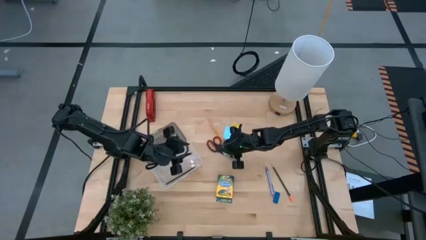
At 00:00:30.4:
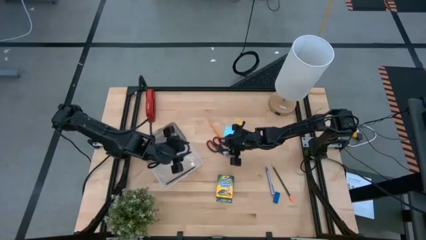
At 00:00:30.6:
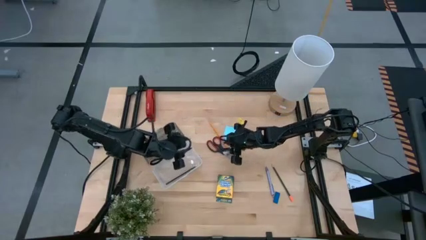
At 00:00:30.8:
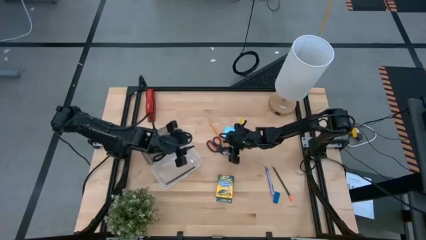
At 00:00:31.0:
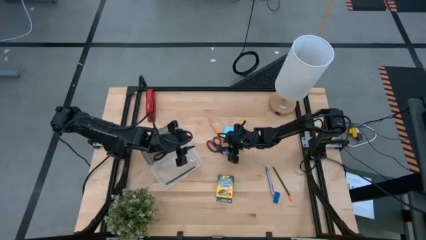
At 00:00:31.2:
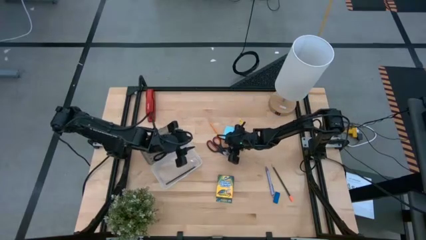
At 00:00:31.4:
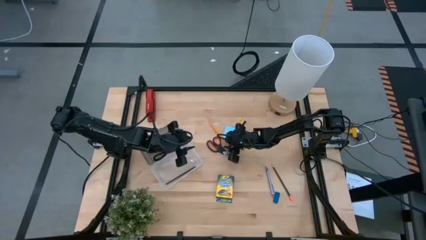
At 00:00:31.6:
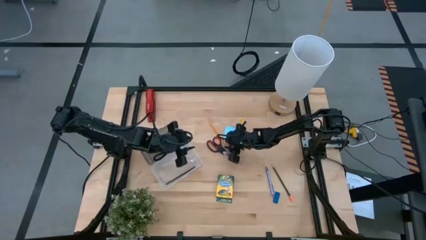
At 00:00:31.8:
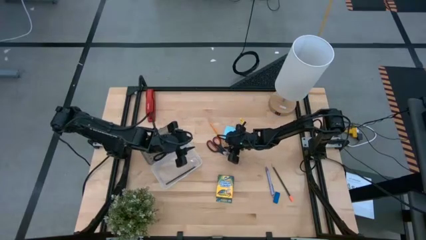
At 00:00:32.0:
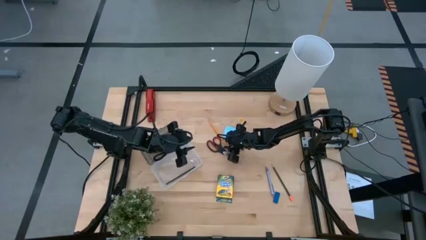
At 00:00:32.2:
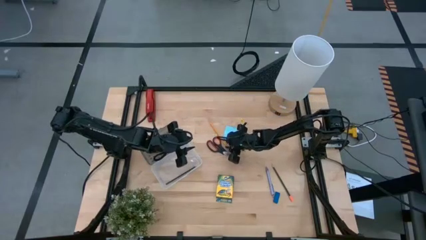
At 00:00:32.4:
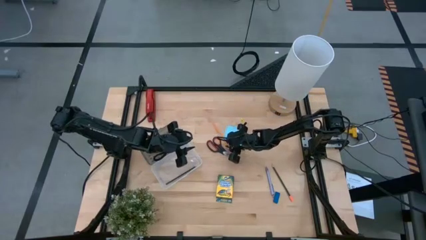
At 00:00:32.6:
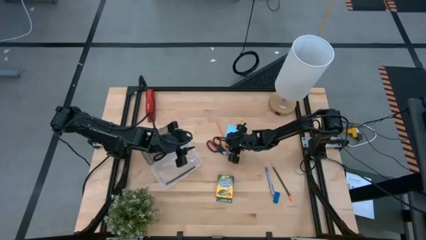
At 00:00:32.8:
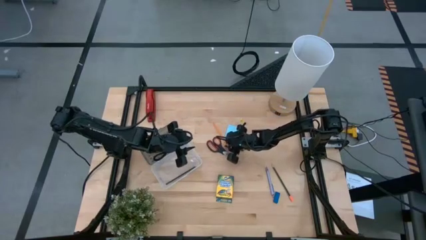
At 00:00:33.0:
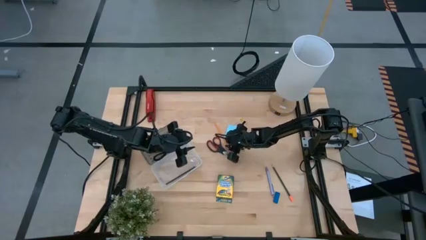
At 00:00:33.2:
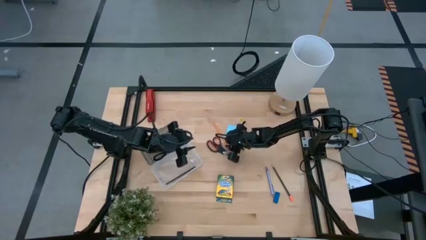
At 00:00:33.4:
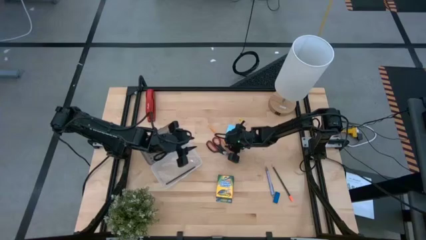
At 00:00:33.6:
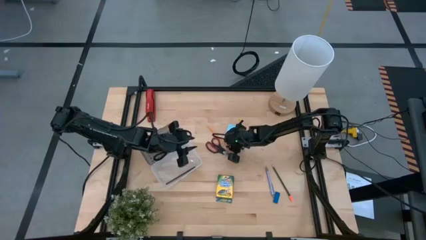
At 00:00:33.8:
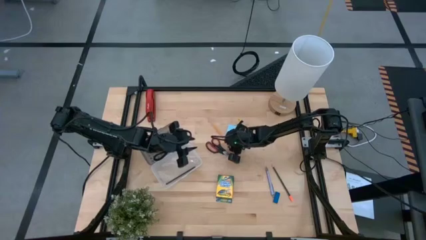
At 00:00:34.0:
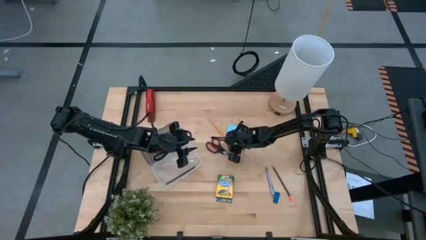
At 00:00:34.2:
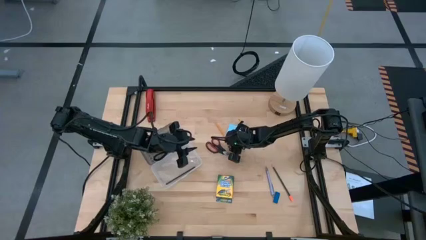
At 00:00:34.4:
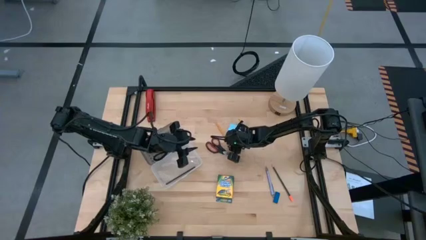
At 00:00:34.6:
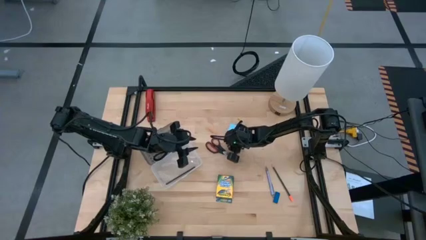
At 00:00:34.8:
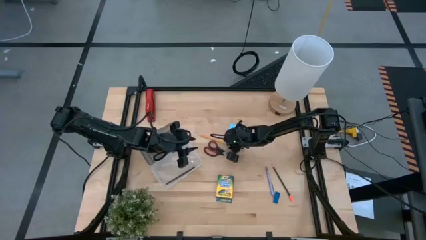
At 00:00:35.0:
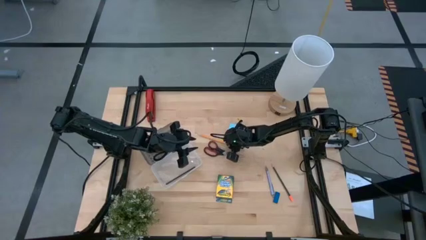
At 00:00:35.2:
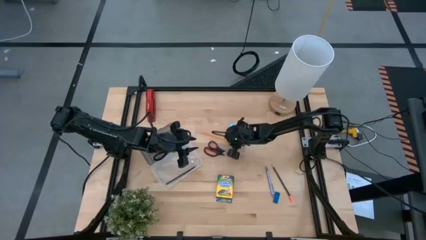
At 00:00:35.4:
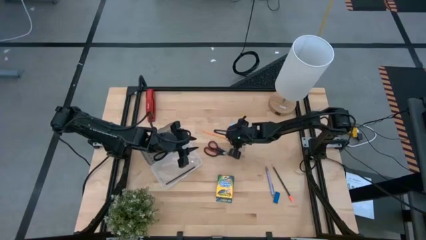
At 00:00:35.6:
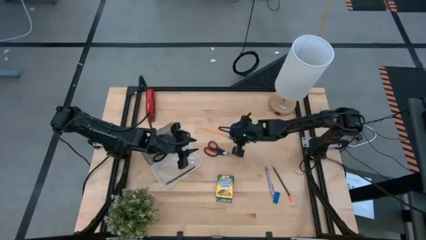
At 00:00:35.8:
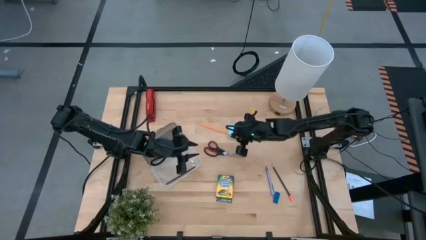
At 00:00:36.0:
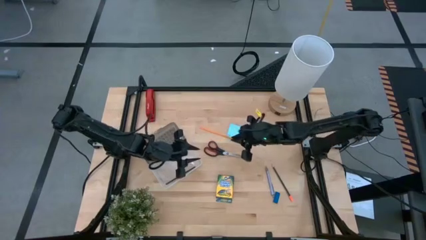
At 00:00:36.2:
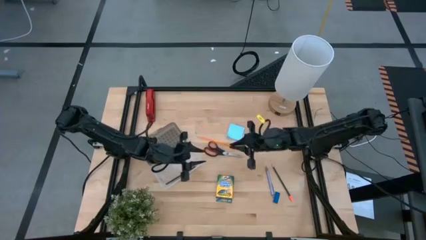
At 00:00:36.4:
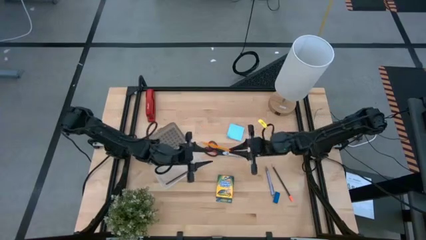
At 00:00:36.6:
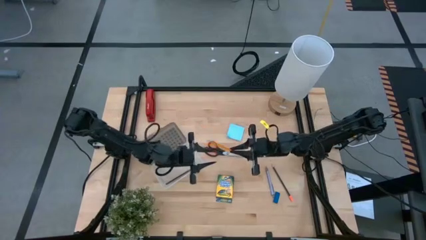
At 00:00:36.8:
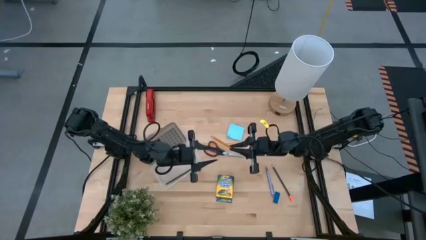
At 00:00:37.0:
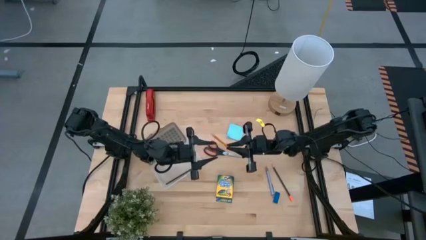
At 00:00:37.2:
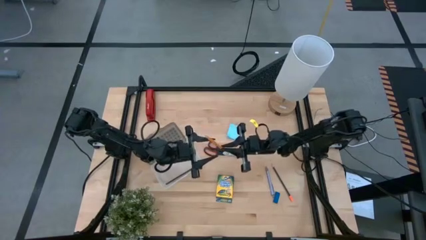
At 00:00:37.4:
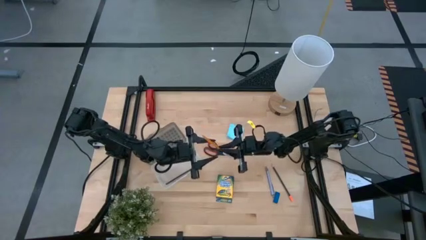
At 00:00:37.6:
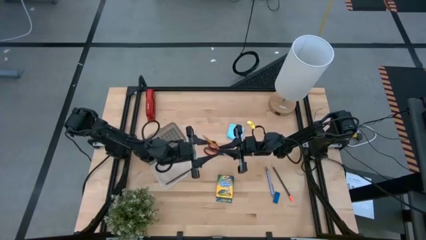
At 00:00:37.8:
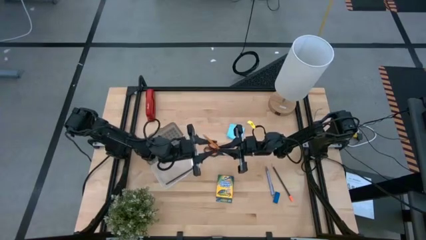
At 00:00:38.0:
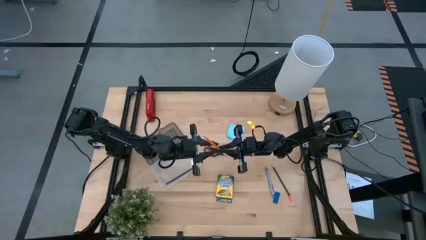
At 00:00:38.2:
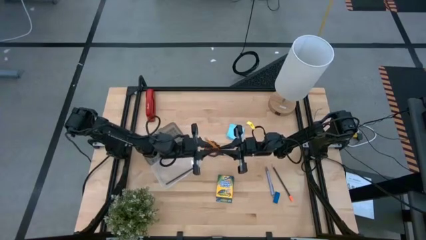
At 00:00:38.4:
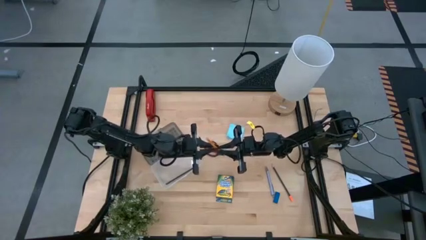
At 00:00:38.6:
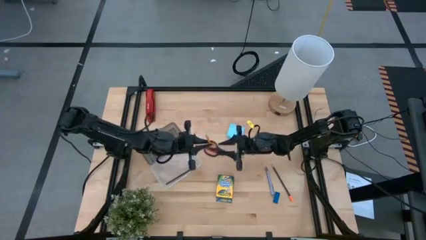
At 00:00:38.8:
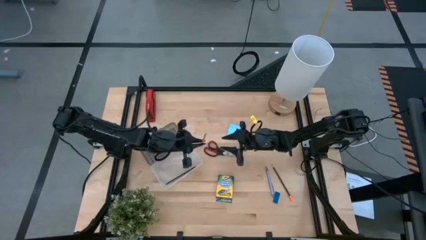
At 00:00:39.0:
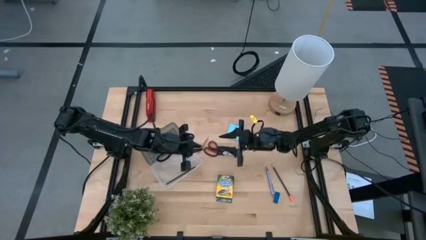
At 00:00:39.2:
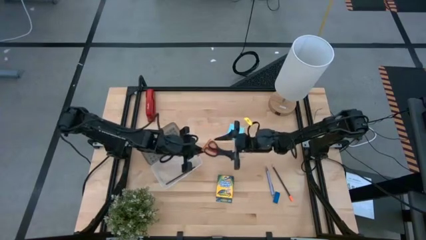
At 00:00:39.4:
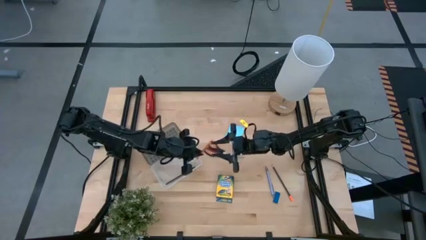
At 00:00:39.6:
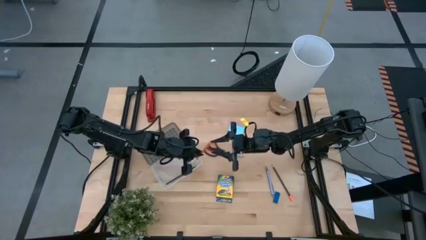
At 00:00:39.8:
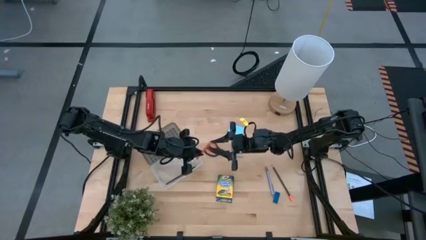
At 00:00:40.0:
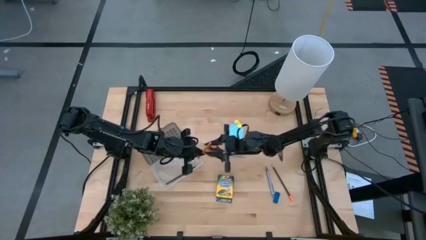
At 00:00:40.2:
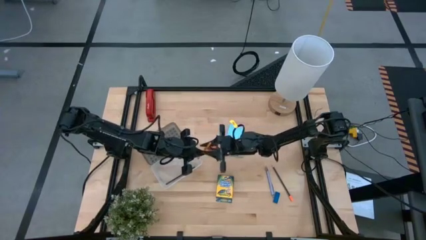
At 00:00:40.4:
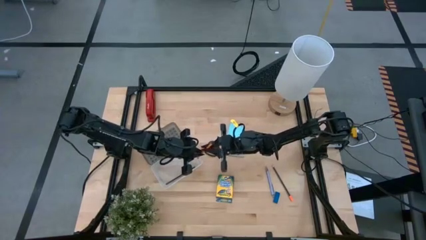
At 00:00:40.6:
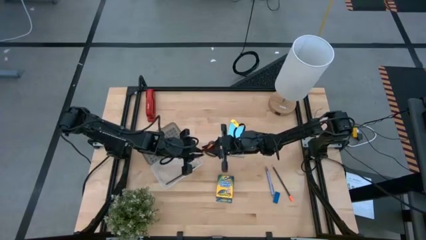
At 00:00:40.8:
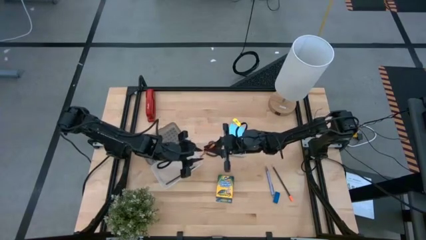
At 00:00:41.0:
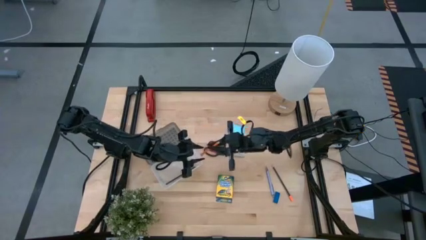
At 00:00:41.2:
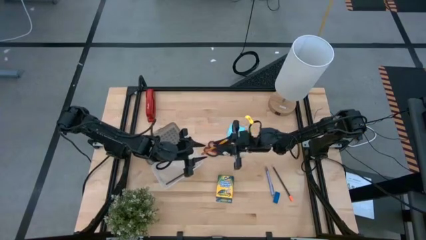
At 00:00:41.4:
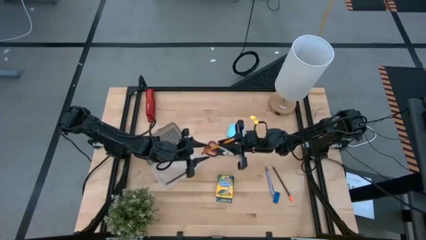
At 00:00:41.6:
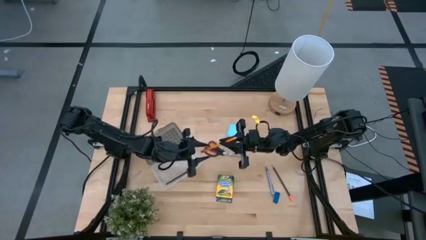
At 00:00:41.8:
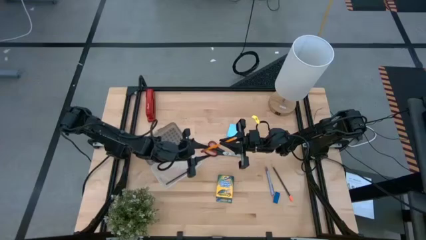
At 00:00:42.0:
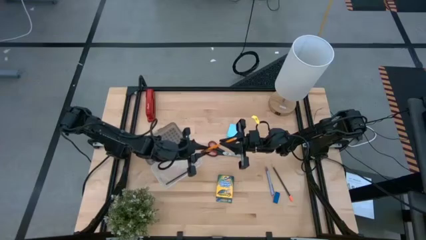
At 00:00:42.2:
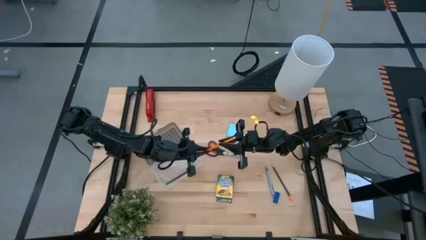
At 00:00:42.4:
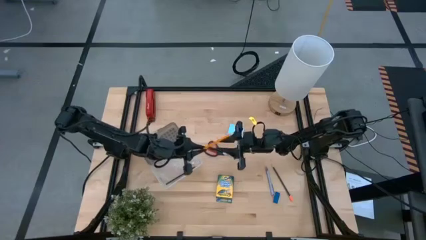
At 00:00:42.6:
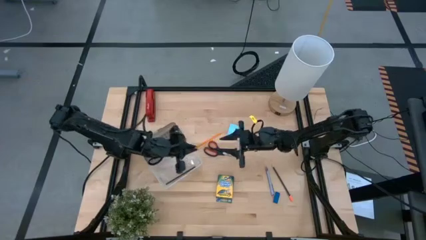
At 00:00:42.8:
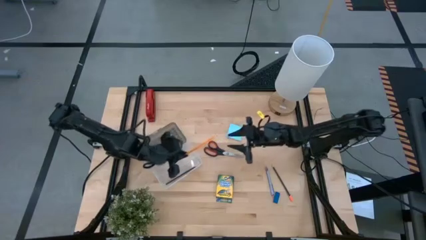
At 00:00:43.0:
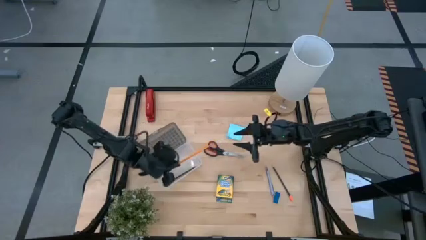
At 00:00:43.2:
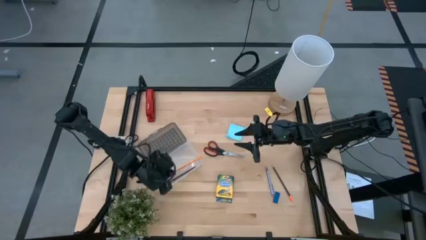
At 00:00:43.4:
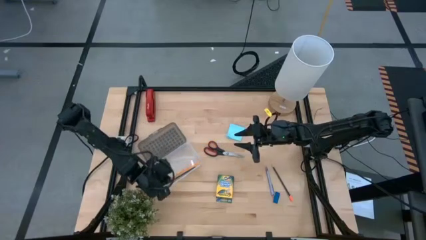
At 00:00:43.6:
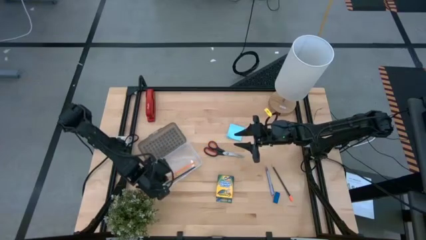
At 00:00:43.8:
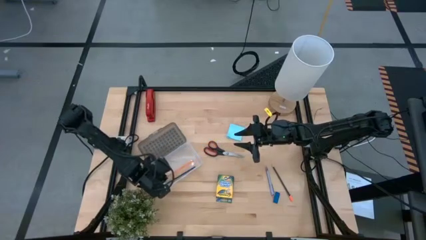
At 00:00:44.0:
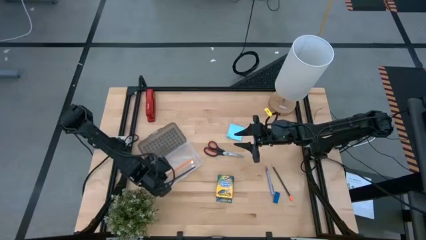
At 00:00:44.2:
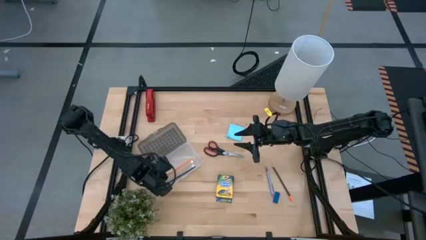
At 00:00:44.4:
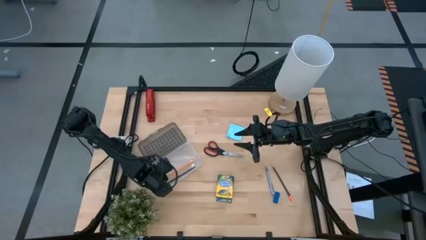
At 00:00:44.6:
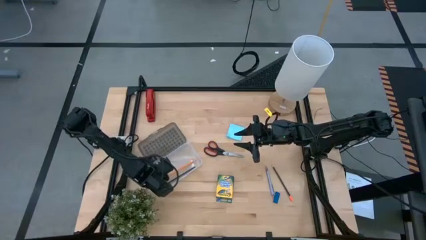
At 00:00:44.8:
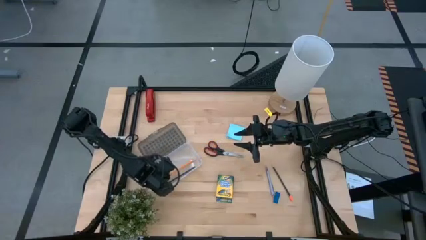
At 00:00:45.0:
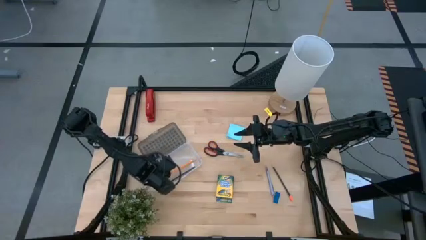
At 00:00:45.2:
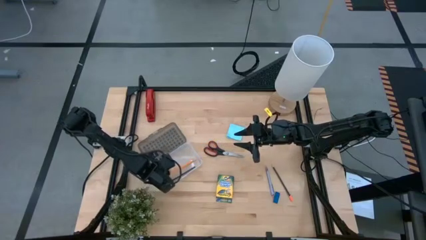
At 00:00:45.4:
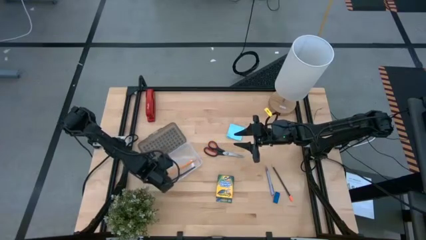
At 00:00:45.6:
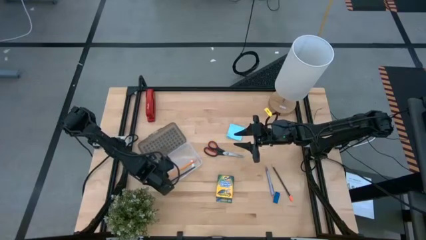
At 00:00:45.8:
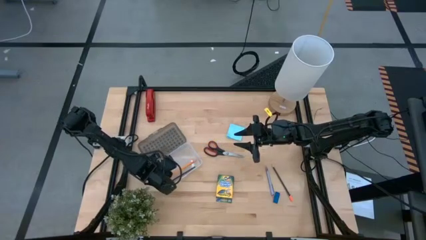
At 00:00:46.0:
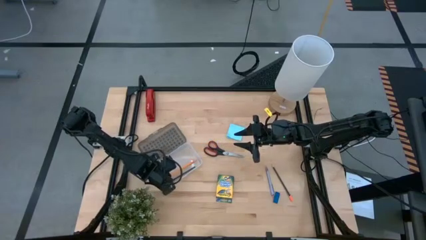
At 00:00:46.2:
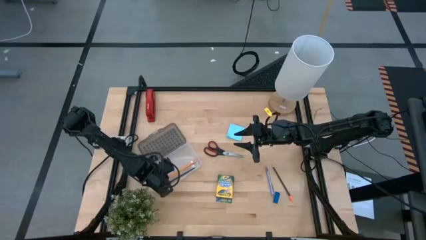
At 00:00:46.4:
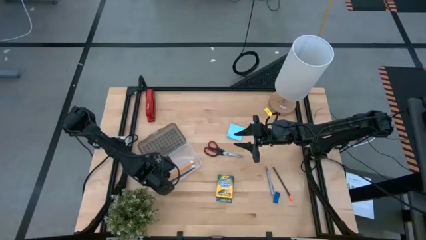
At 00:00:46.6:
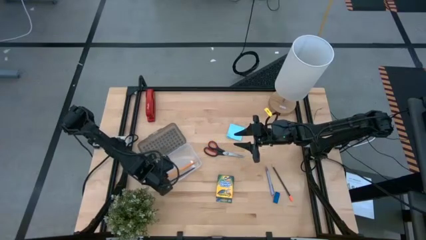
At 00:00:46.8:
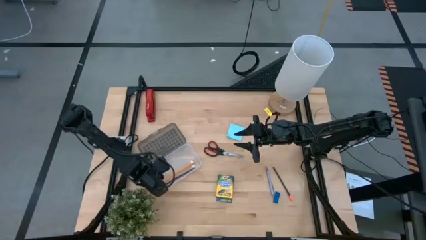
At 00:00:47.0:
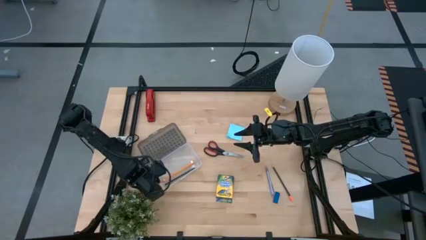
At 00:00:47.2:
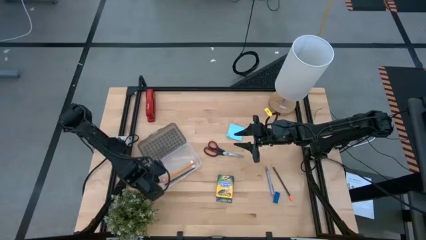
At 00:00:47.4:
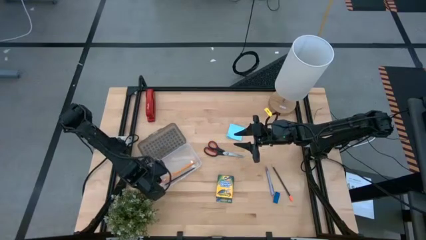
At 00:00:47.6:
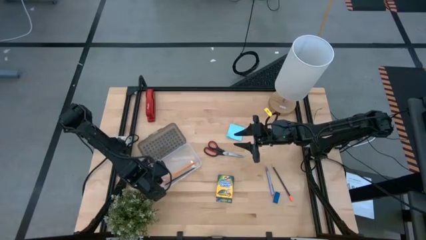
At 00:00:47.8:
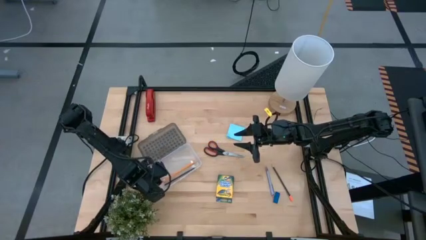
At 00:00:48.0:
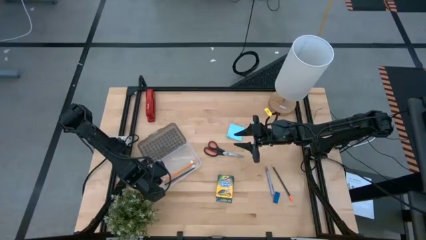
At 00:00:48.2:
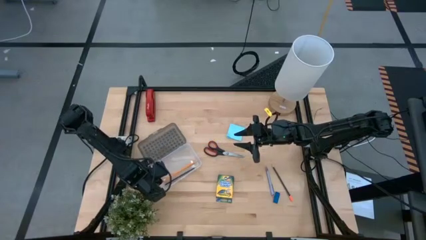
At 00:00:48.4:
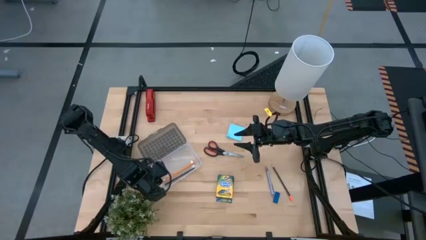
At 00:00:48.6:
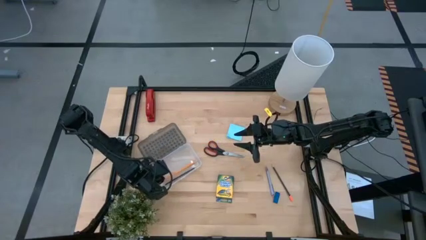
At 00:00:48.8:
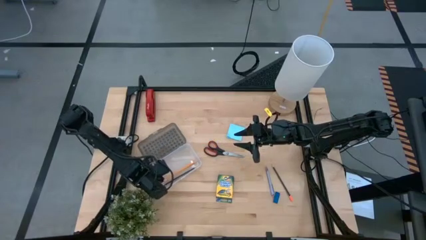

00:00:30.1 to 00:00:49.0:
Task: Pack school essentials
Put the yellow pencil into the supply box
